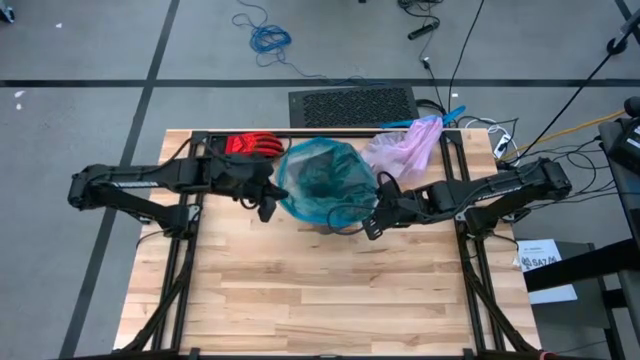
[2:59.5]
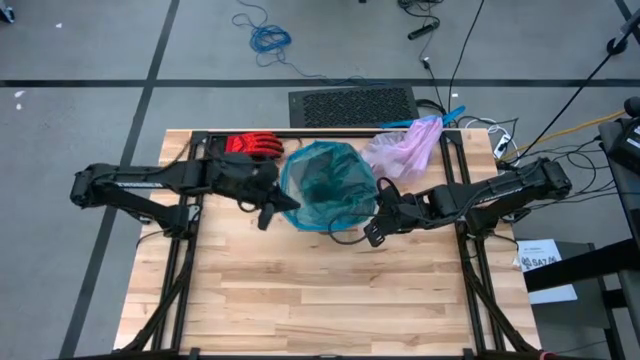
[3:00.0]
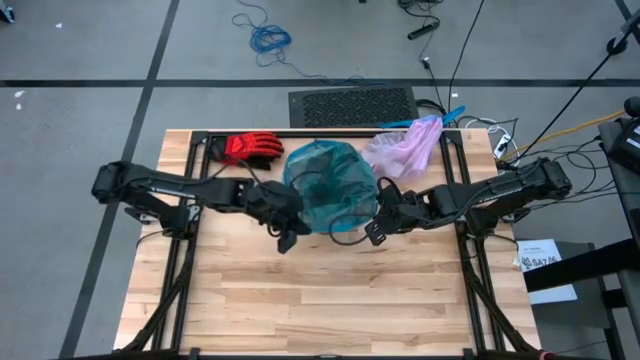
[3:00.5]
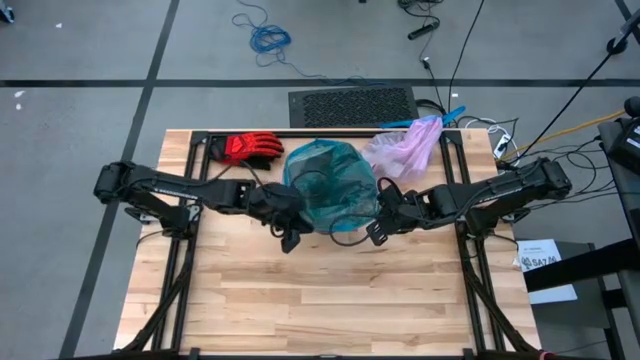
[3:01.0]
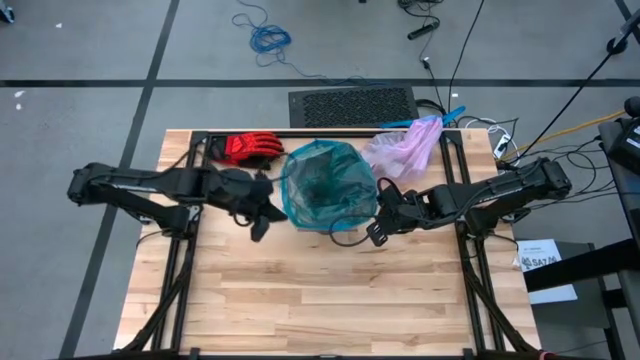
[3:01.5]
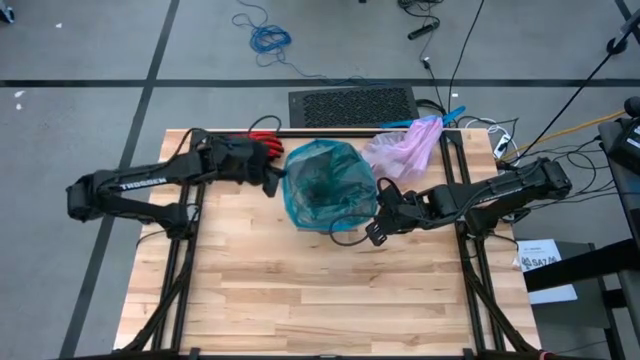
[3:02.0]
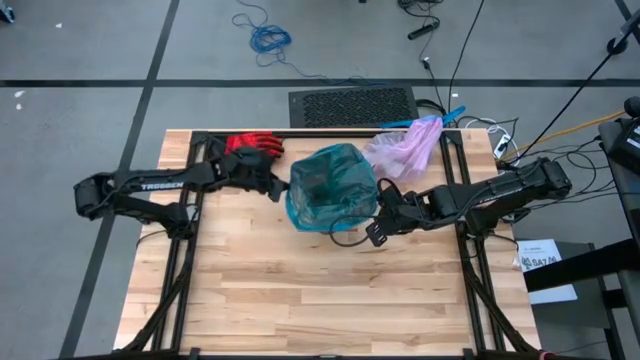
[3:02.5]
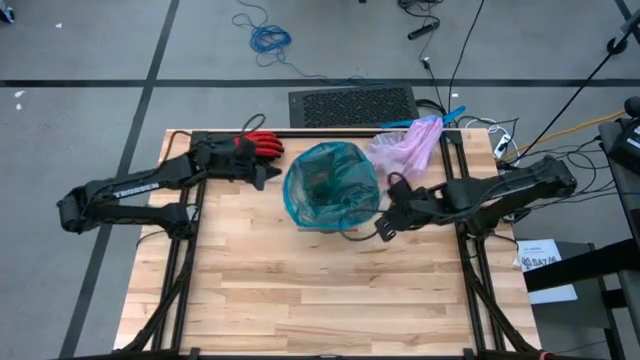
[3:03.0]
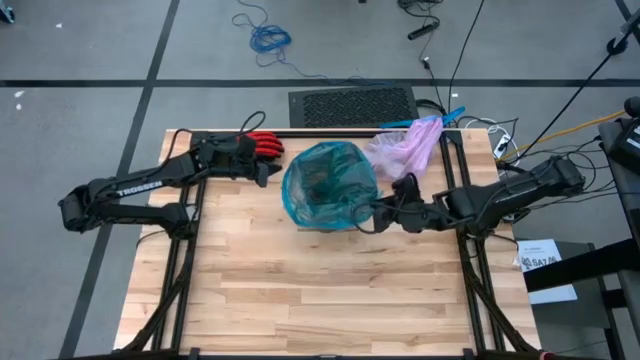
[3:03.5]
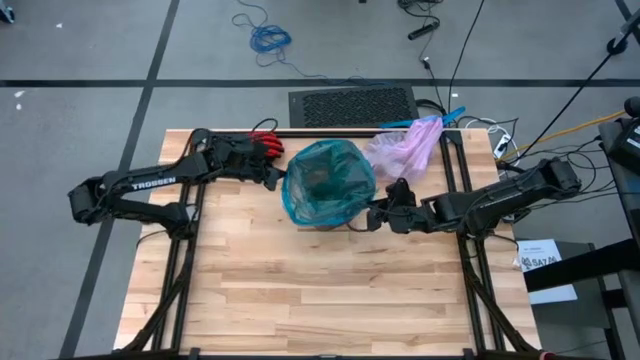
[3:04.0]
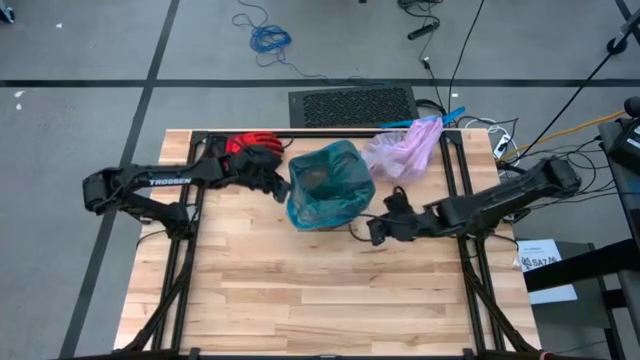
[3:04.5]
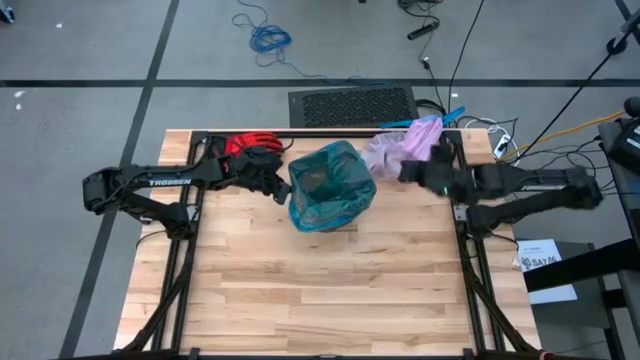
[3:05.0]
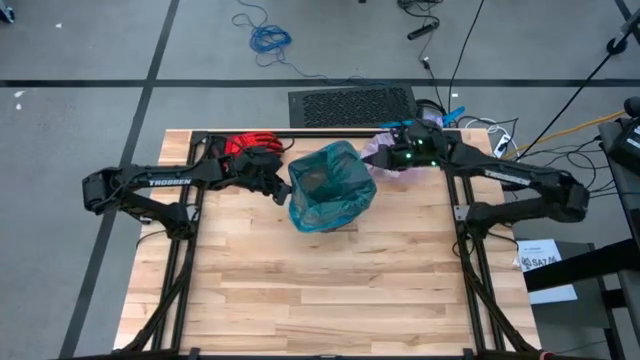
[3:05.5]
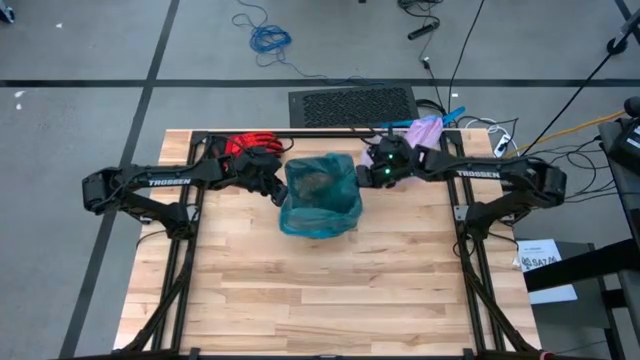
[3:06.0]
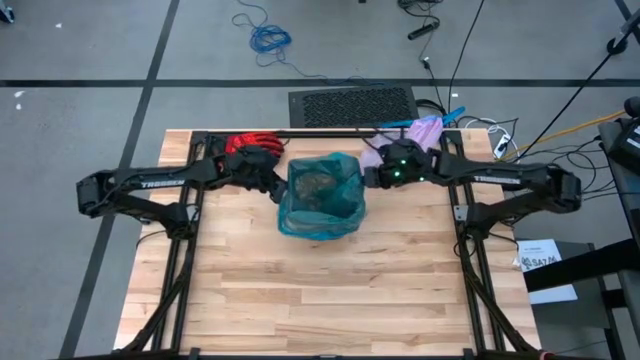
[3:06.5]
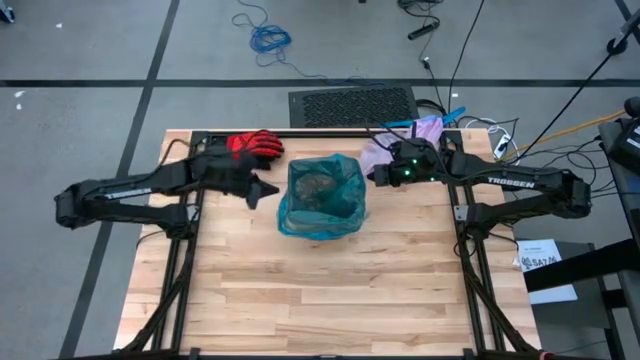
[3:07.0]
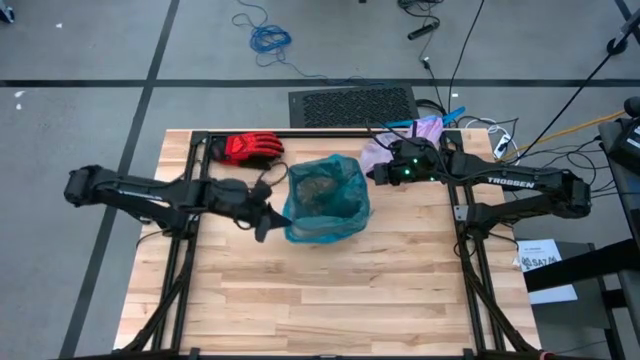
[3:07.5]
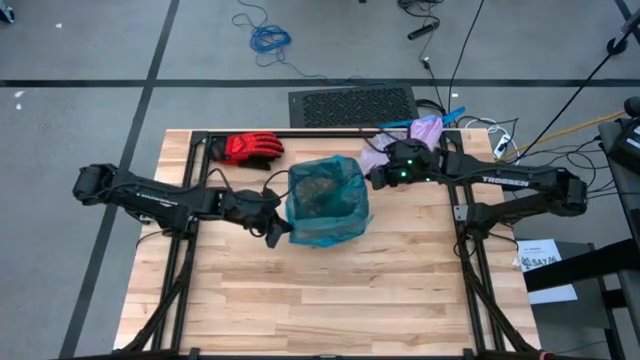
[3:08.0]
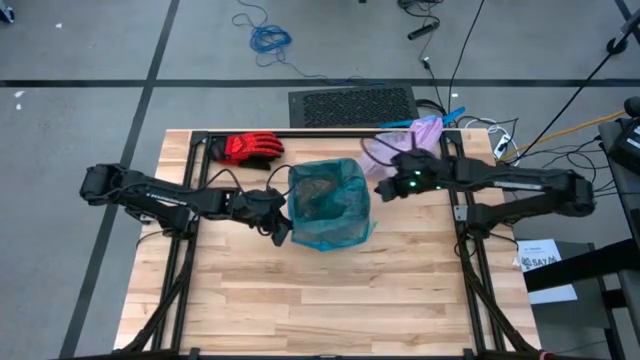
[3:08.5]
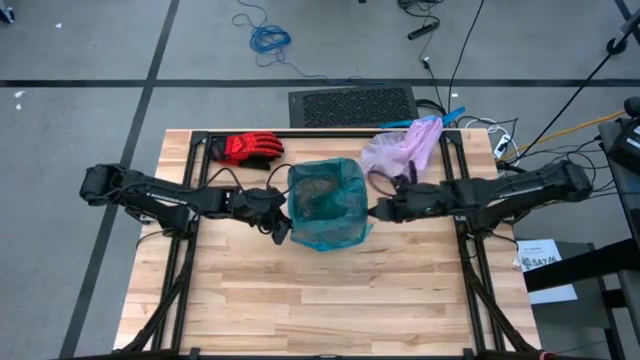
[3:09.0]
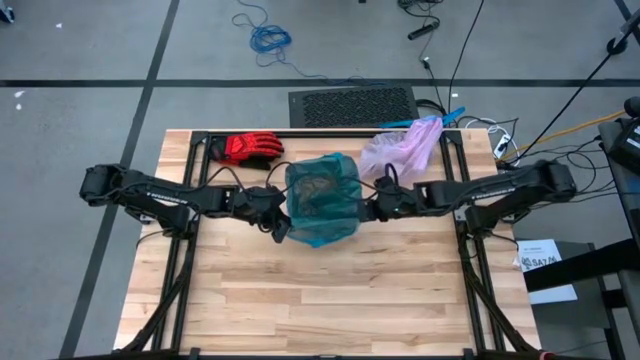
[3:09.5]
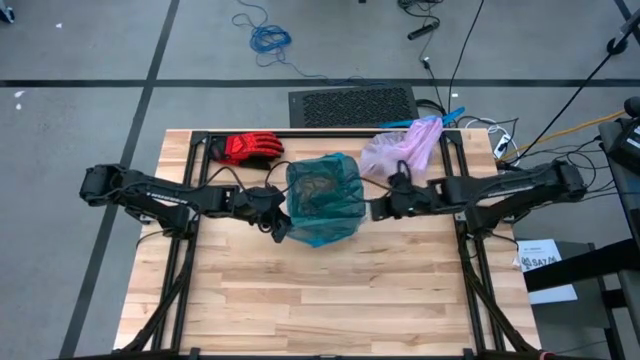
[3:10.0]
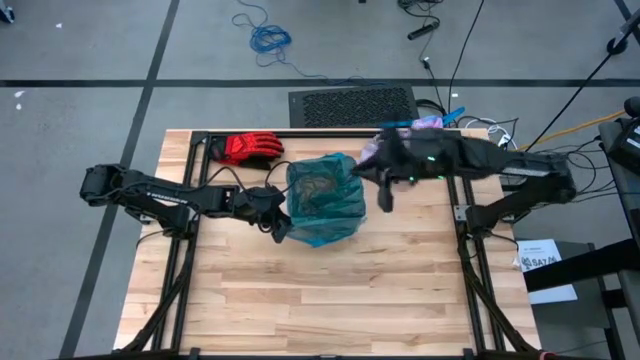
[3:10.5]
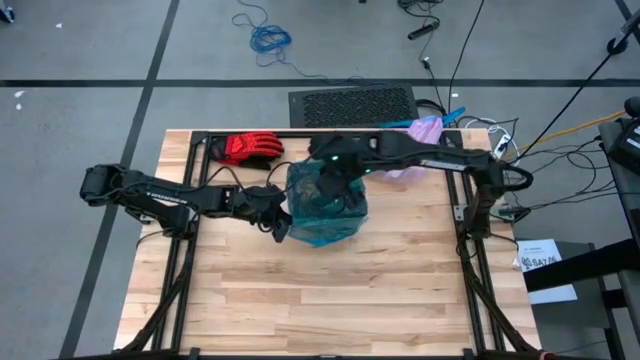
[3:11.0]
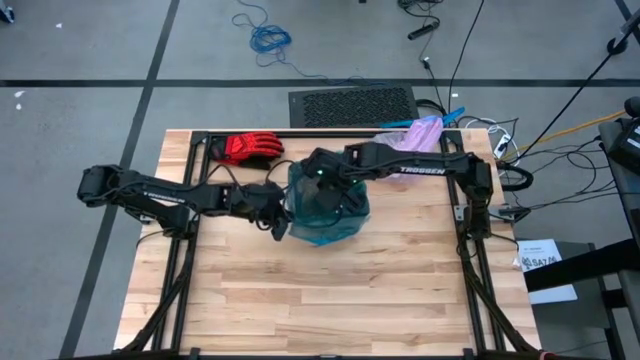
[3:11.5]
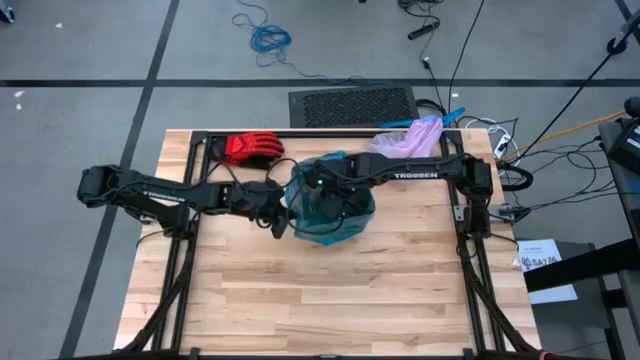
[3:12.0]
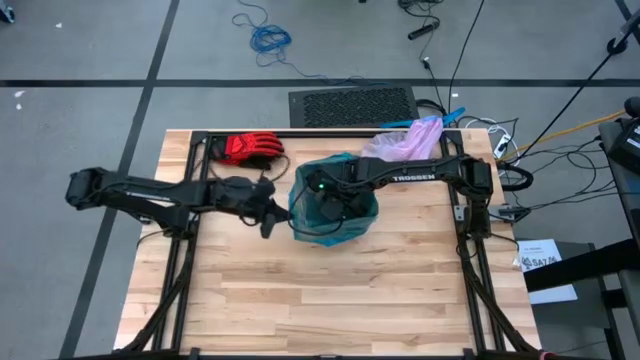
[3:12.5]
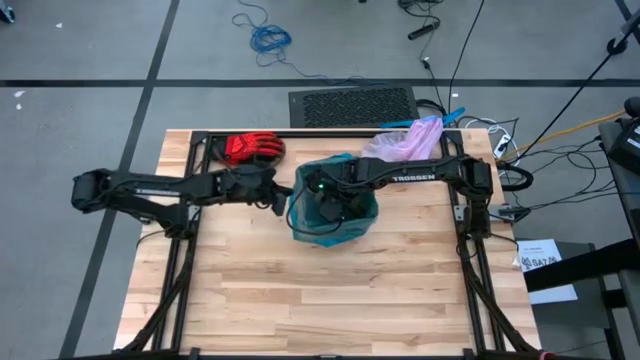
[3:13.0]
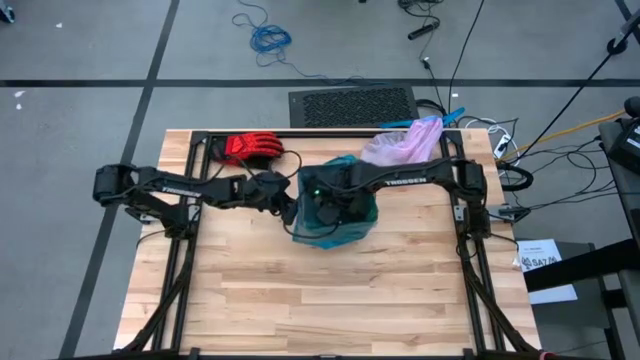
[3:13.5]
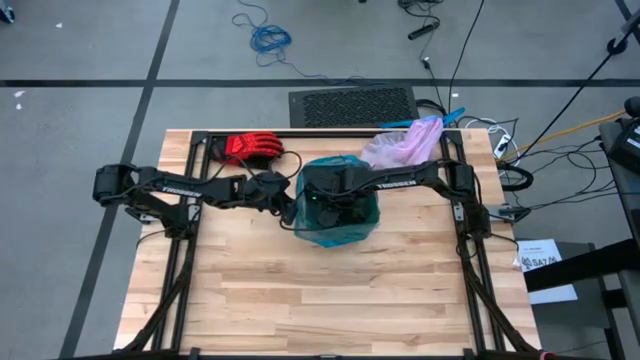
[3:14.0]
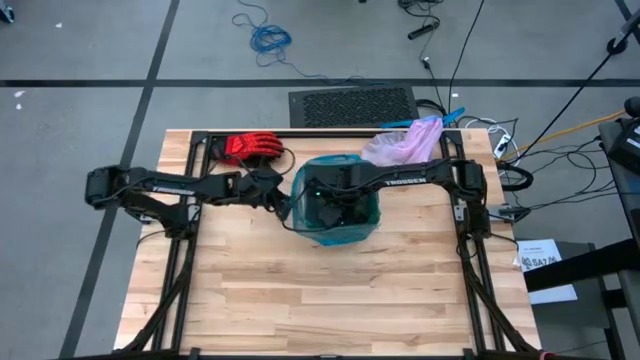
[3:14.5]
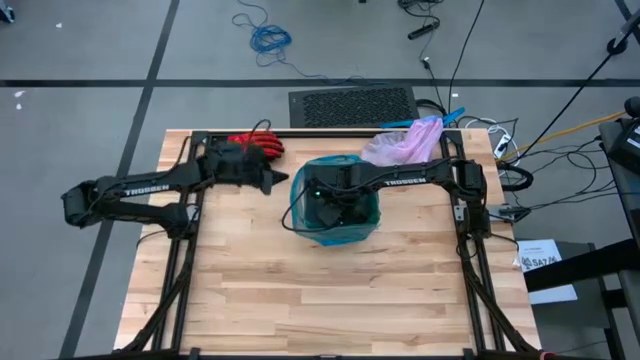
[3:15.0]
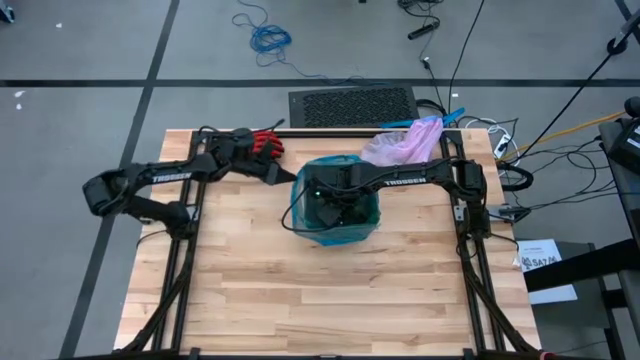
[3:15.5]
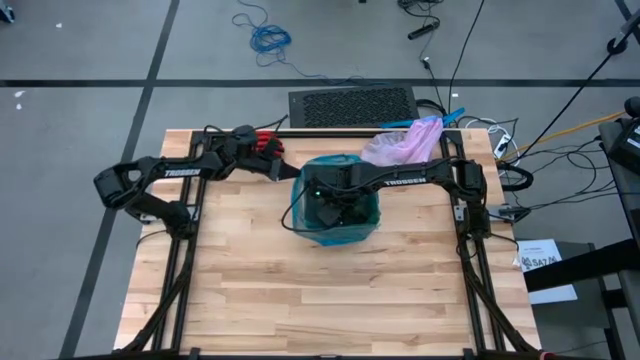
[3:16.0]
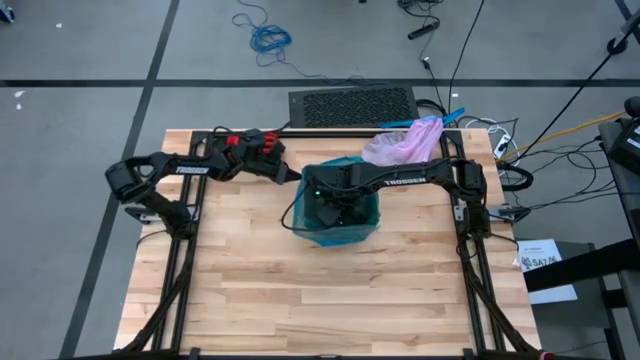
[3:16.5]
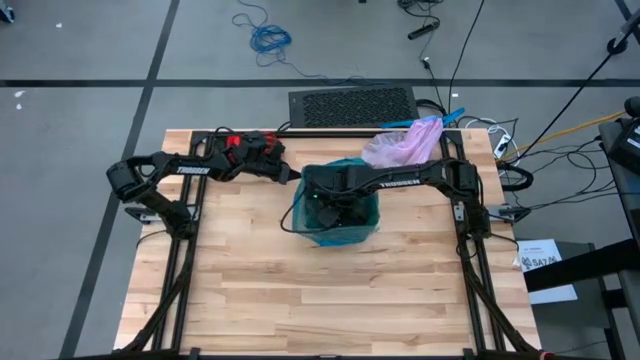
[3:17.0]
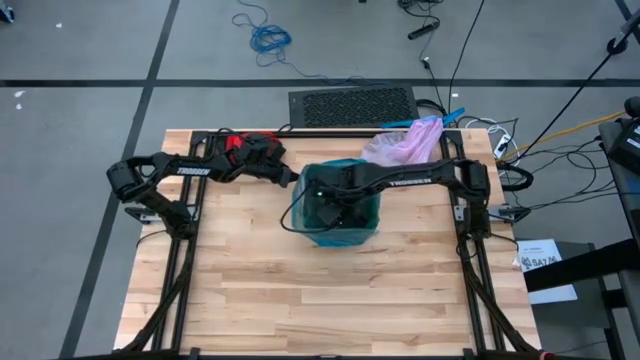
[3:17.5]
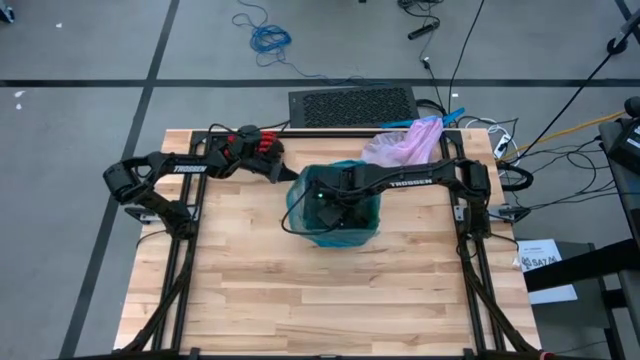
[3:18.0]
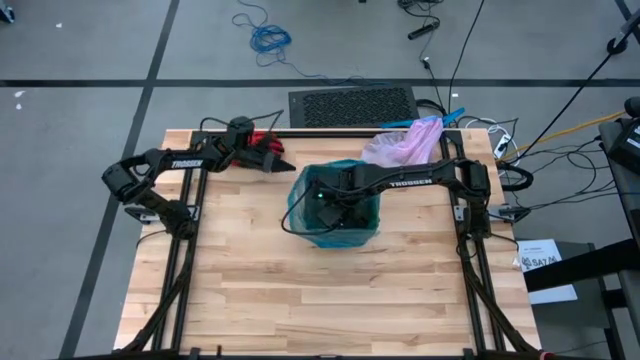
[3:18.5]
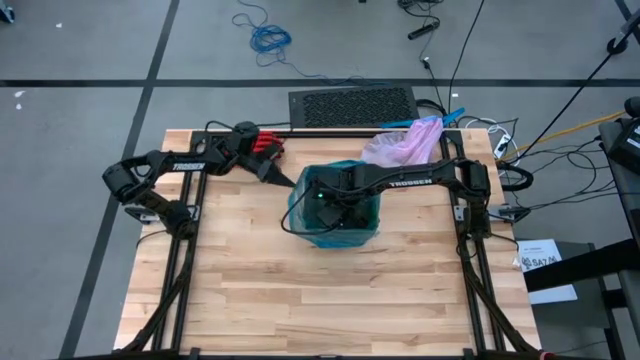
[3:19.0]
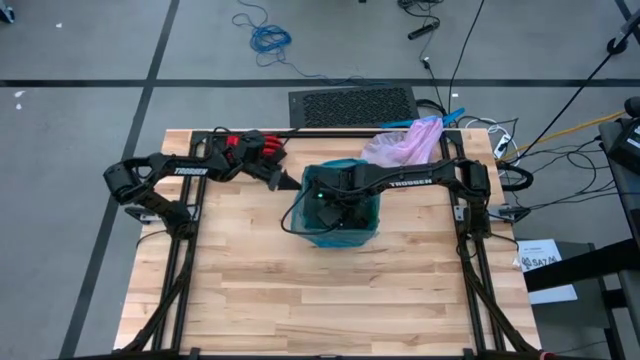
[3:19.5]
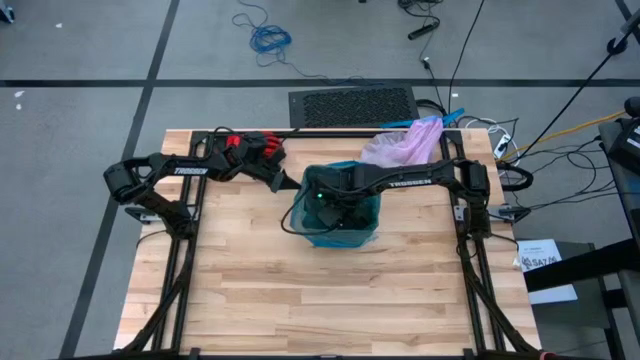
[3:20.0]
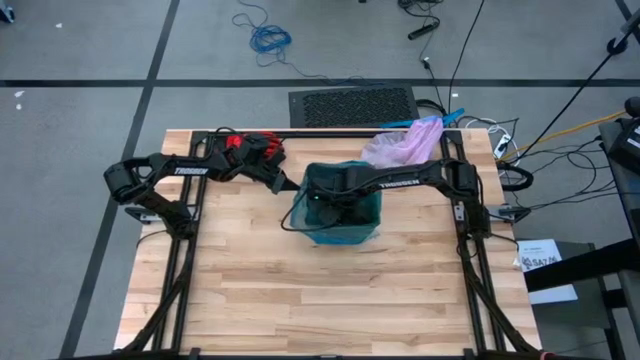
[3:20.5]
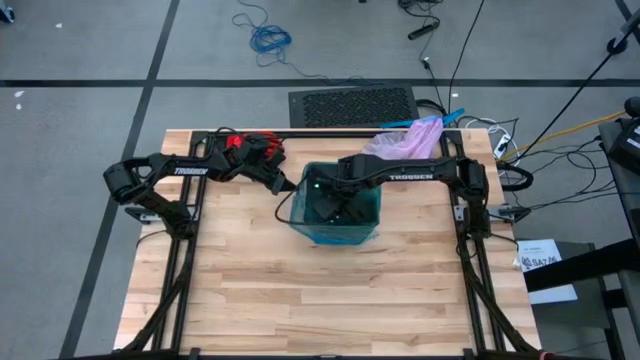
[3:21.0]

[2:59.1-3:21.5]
Task: place trash/remove bag and relplace
Insert the new blue trash bag into the trash bin
